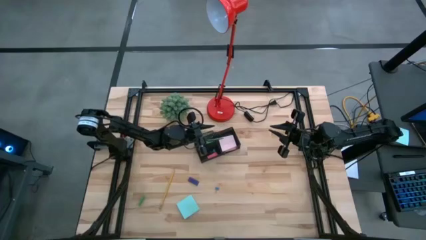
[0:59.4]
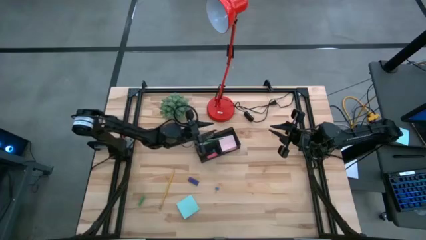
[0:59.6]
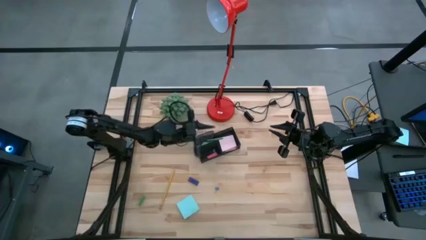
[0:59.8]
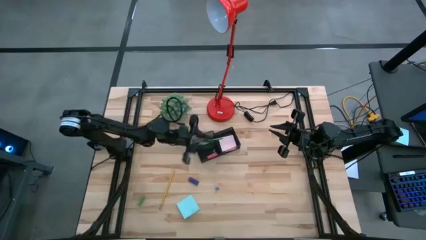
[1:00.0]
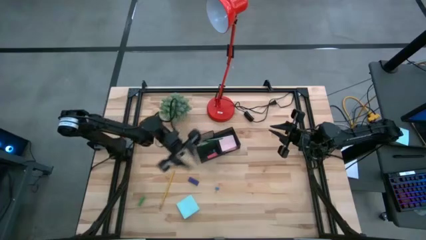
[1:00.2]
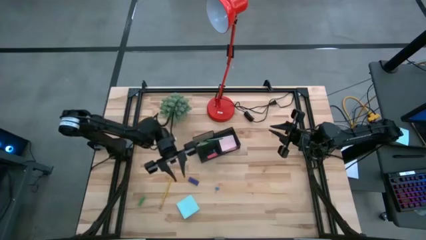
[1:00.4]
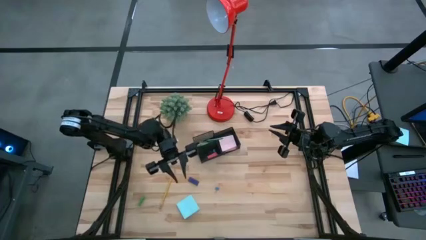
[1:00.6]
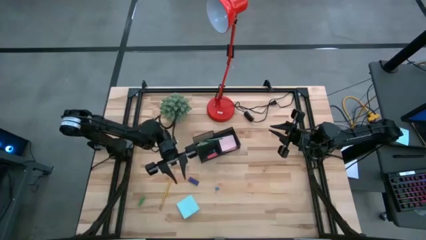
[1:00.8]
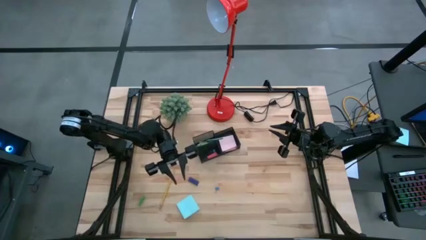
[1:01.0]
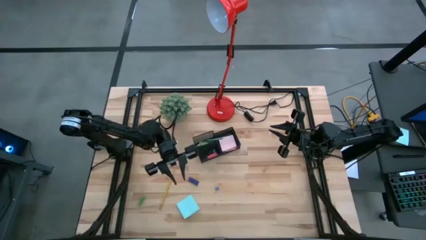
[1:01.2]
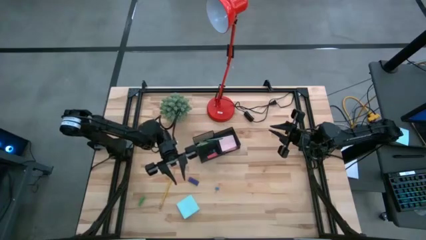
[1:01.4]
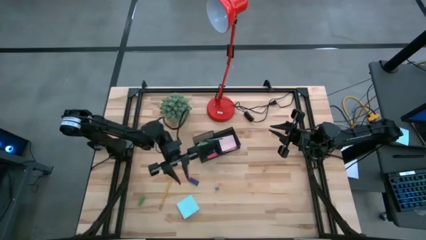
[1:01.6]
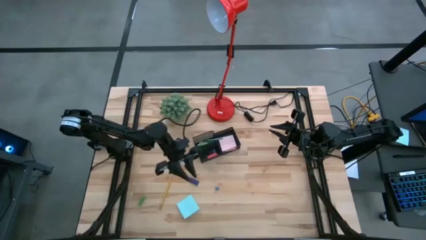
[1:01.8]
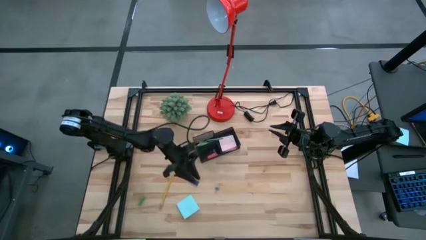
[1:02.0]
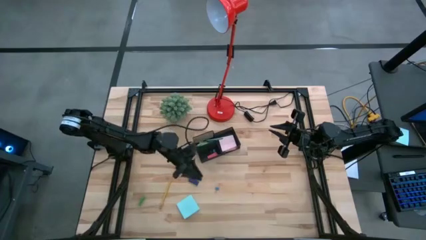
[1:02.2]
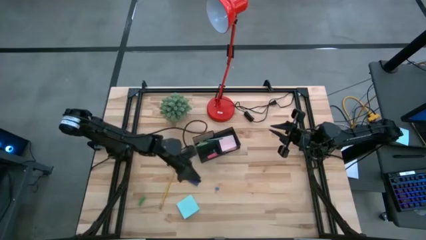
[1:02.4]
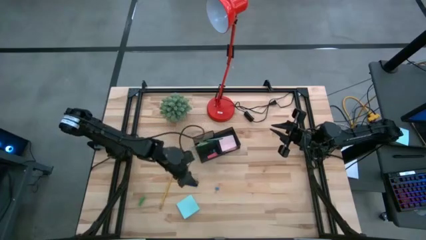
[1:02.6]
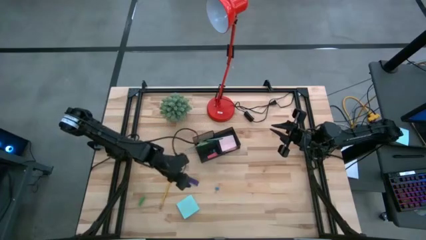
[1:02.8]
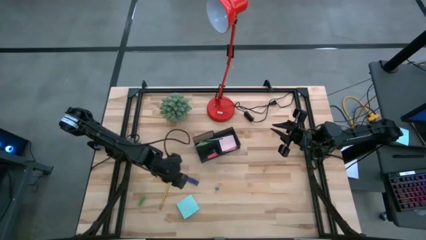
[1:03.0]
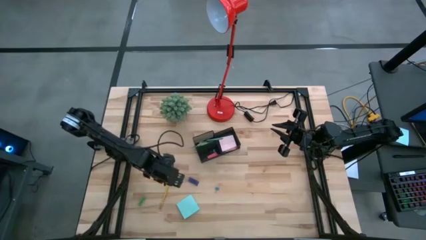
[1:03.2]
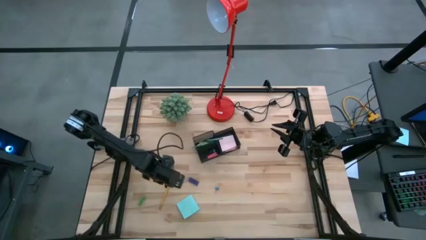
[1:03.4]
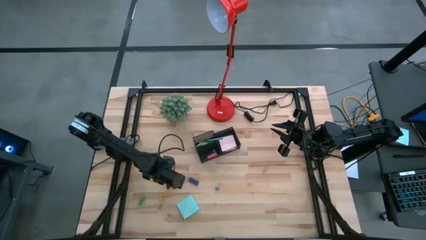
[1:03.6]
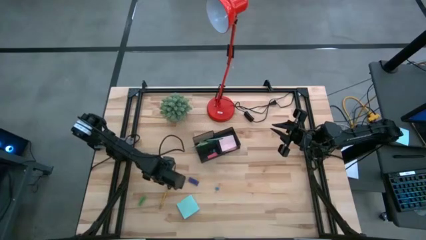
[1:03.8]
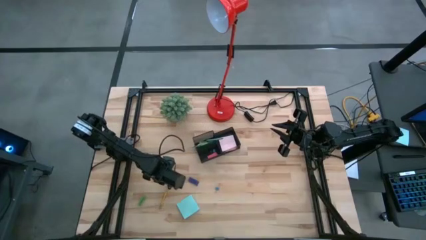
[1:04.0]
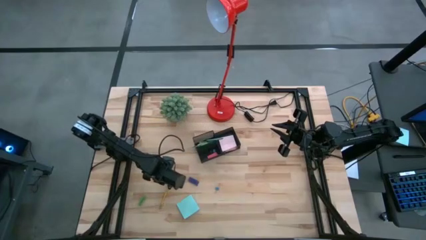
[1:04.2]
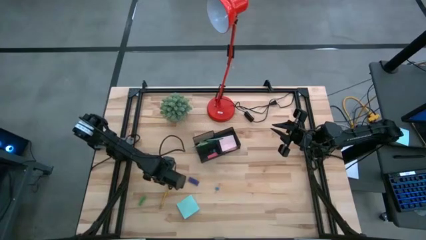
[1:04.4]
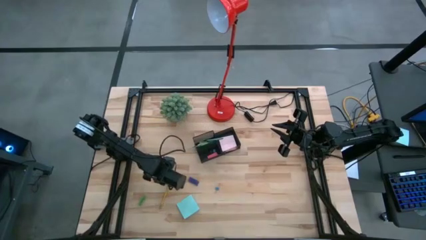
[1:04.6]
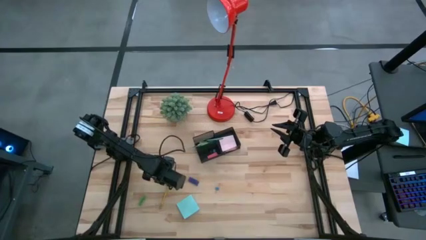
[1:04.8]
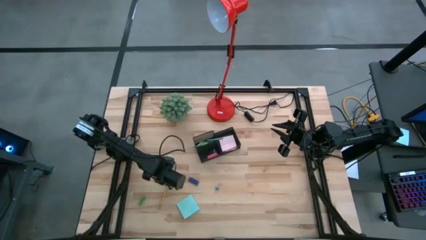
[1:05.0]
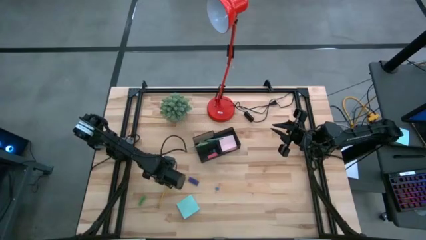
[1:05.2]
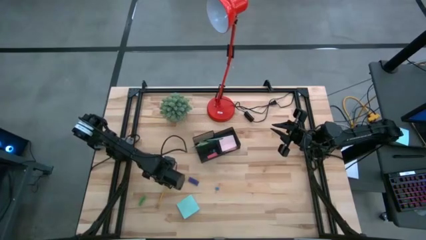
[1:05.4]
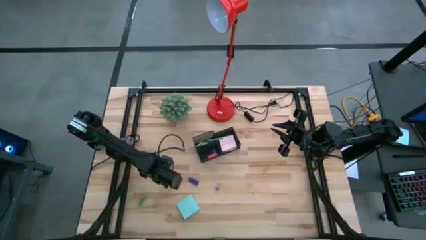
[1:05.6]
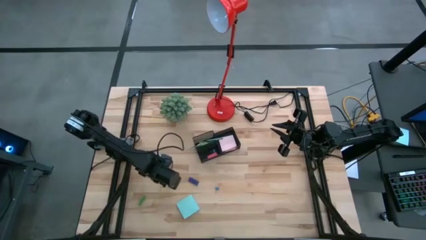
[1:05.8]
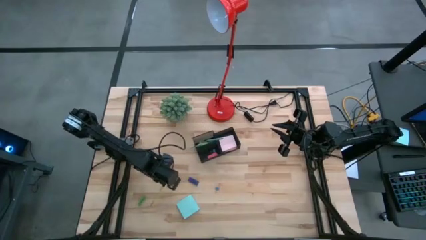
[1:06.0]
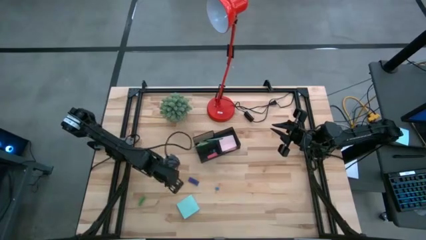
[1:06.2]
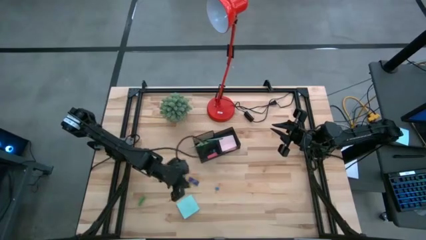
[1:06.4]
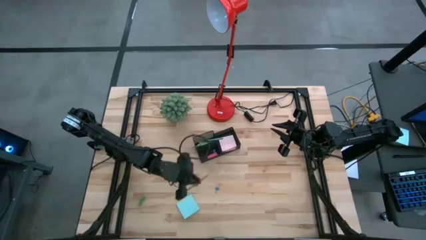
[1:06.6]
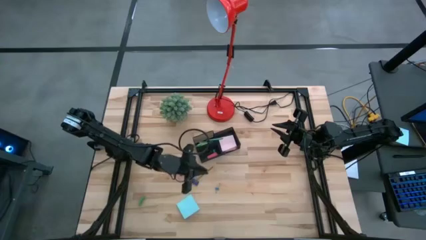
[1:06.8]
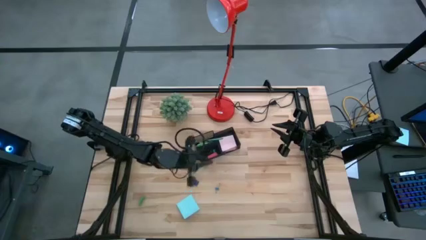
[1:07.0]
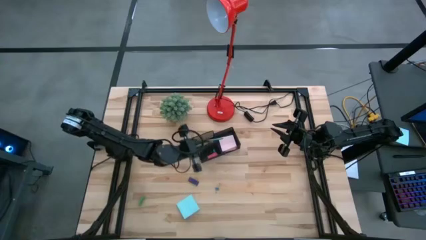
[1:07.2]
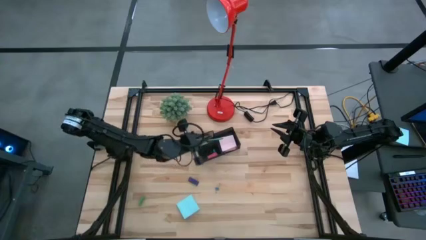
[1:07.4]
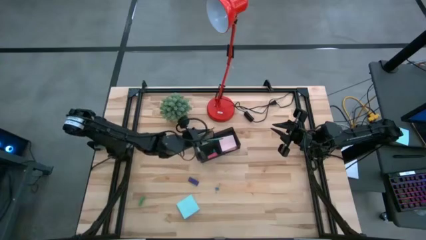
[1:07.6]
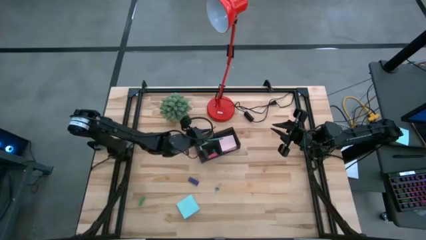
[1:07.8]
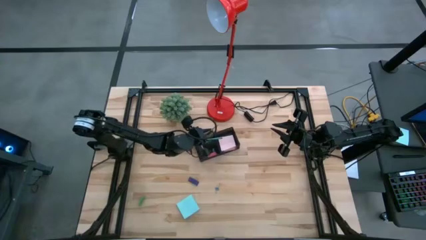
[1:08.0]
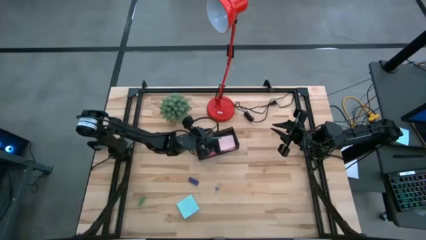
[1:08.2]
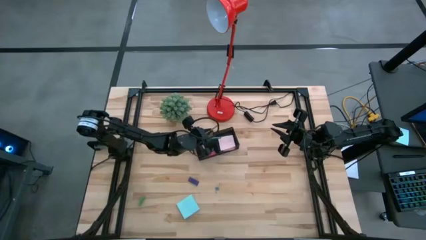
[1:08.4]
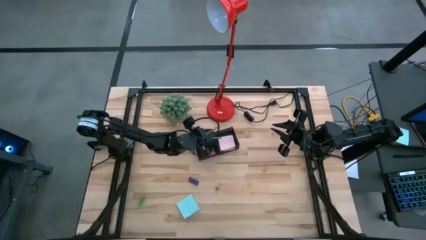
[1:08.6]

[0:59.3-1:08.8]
Task: Pick and place office supplies into organizer
Put the yellow pencil into the black desk organizer

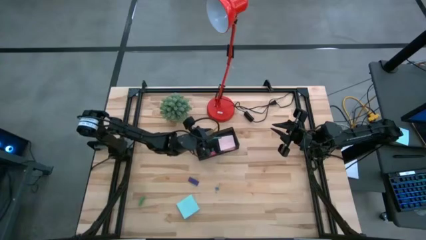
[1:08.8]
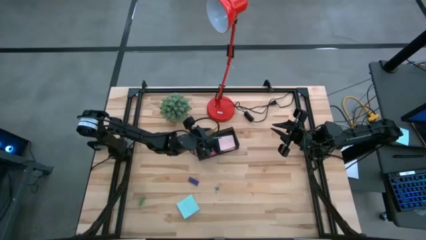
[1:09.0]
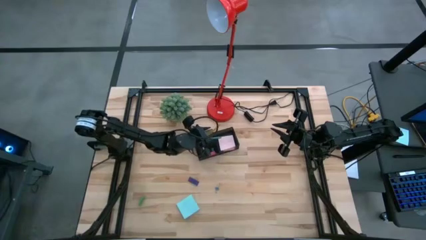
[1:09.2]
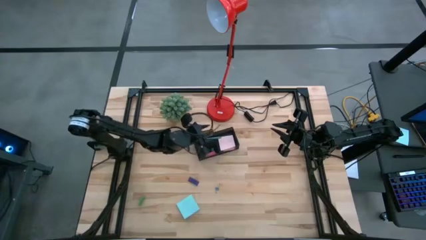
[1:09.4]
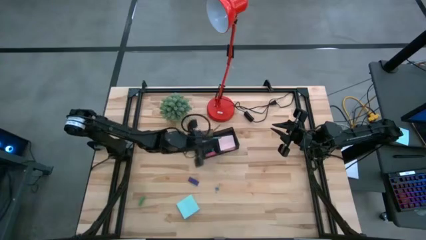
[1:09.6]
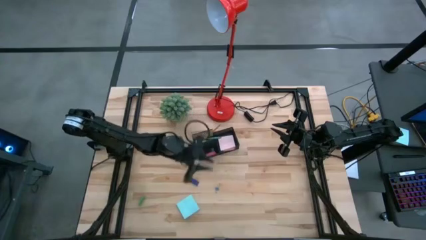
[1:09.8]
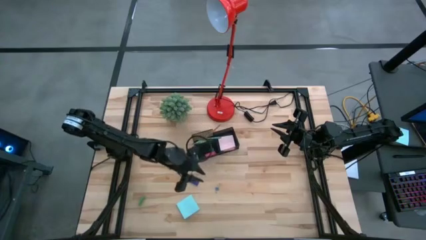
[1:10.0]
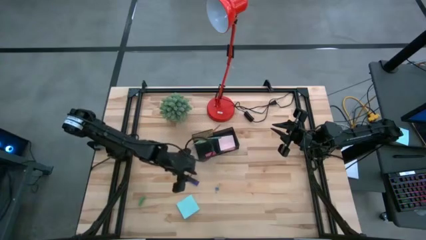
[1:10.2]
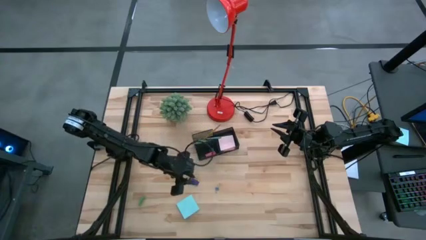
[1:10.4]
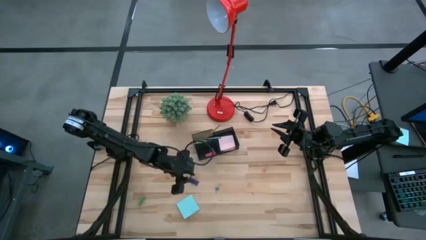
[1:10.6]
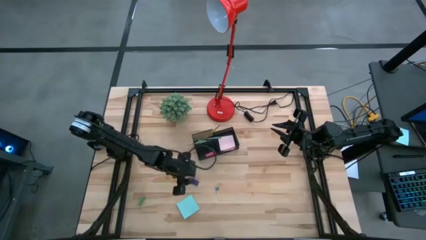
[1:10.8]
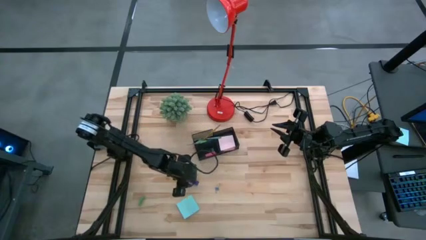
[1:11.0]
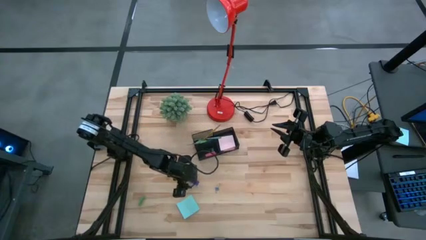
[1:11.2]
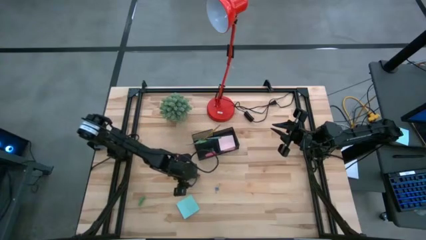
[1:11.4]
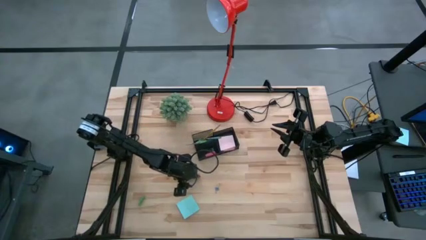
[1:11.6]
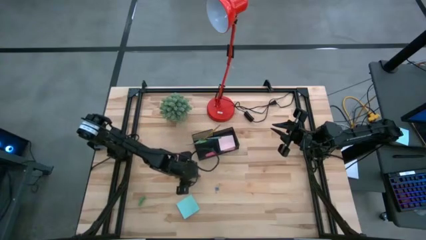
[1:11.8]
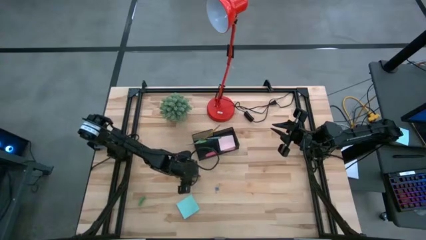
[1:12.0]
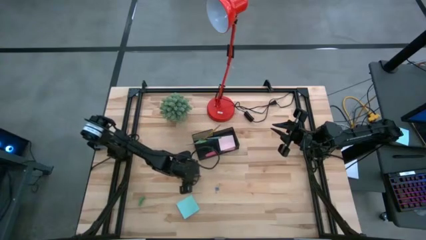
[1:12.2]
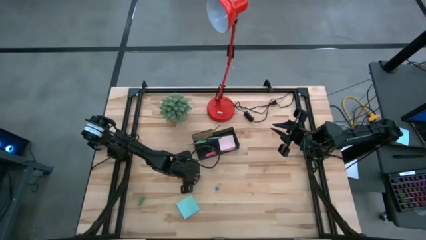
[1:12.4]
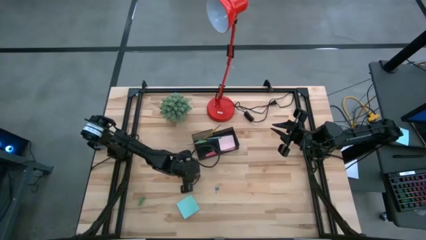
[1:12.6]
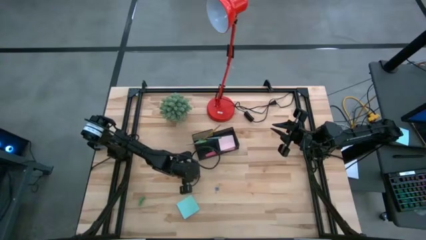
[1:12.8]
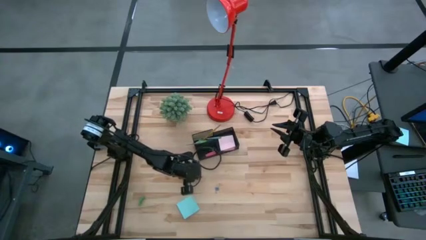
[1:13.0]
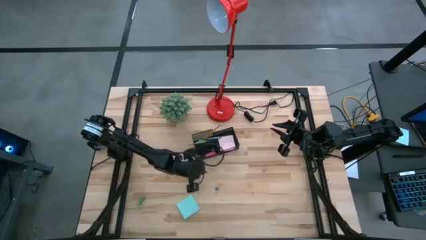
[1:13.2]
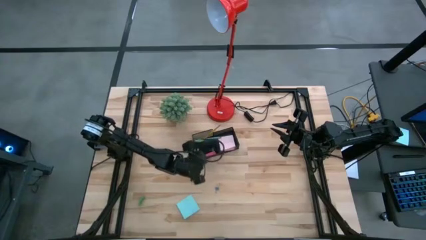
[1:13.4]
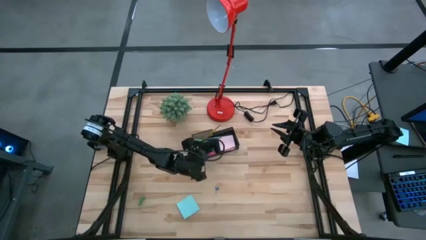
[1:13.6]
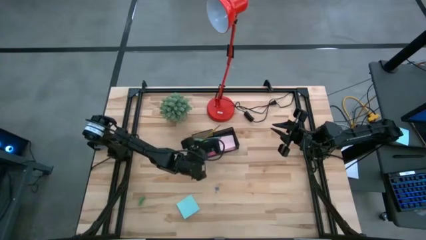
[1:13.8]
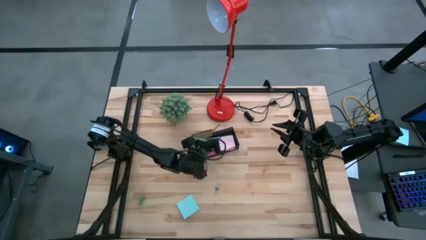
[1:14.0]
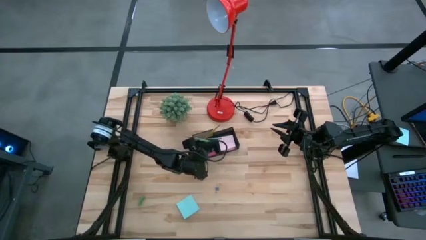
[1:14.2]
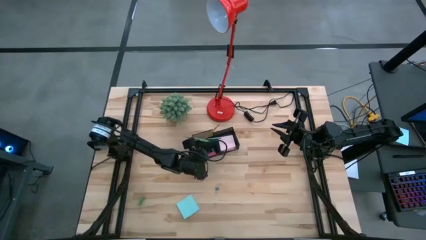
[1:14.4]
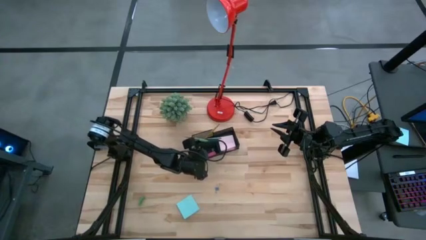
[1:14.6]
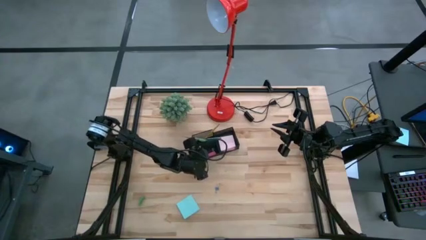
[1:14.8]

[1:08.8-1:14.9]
Put the blue eraser into the black desk organizer
